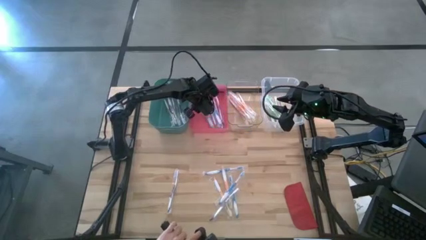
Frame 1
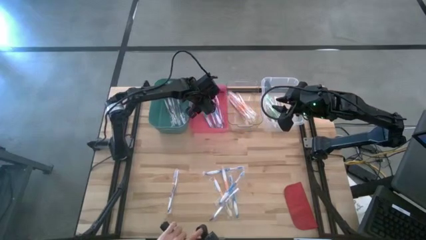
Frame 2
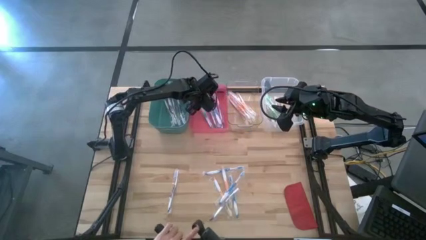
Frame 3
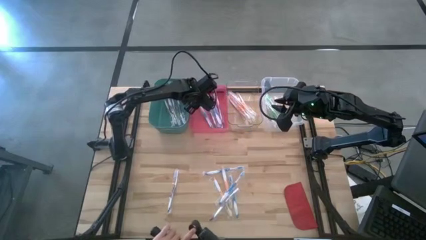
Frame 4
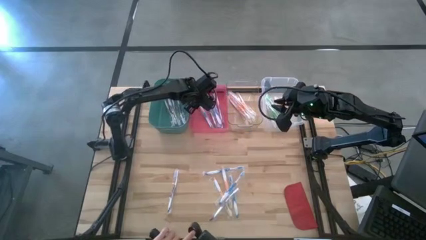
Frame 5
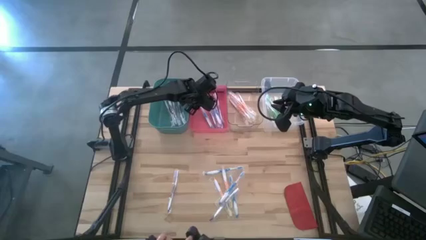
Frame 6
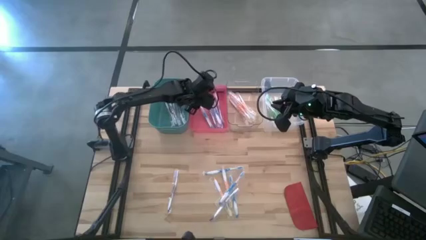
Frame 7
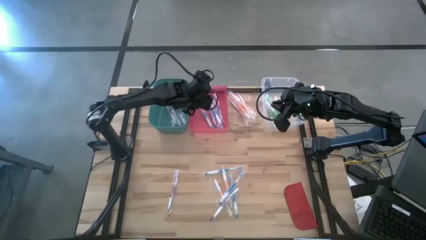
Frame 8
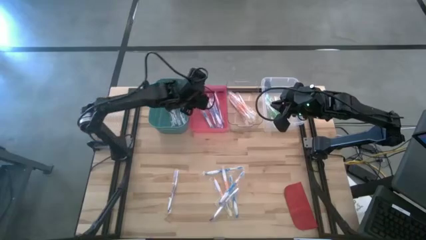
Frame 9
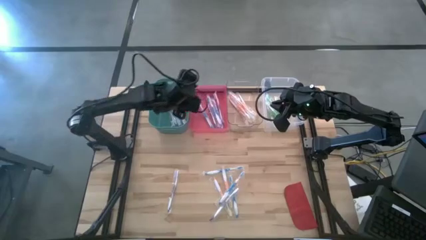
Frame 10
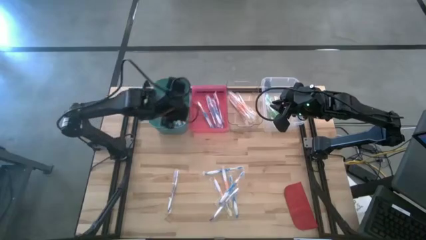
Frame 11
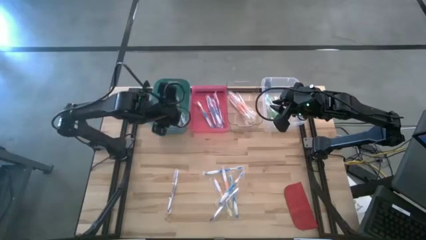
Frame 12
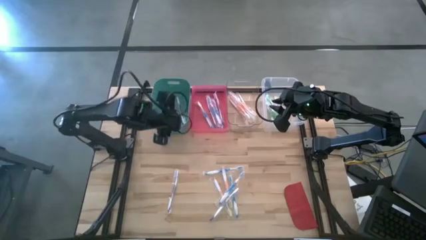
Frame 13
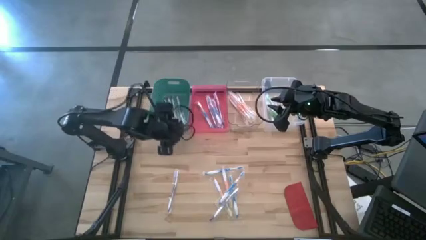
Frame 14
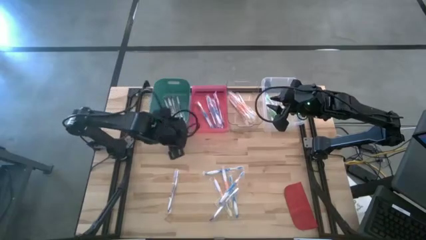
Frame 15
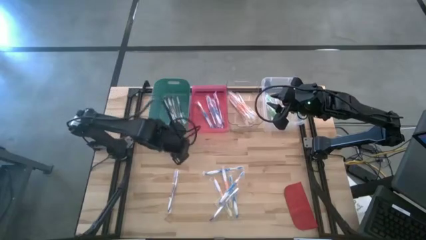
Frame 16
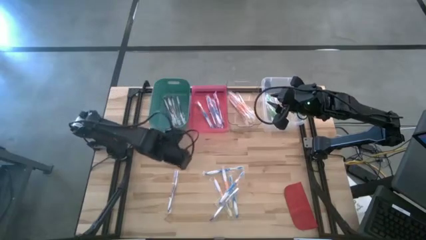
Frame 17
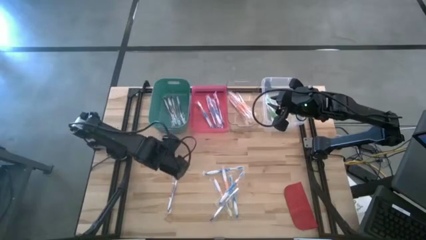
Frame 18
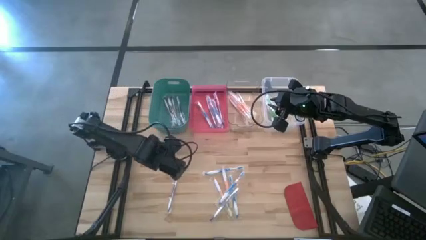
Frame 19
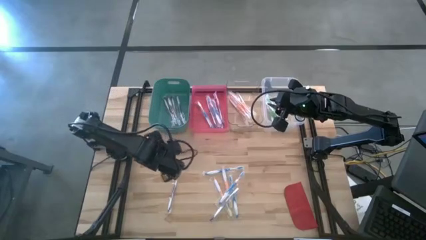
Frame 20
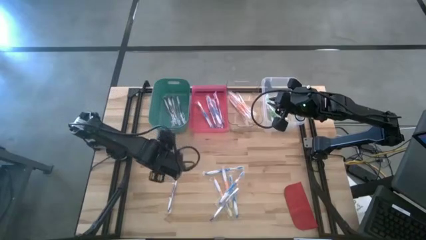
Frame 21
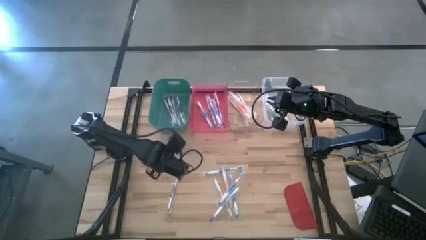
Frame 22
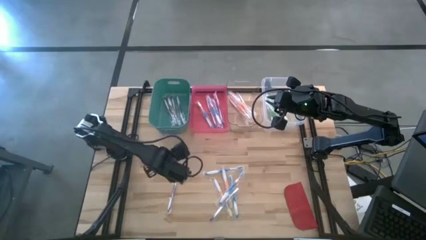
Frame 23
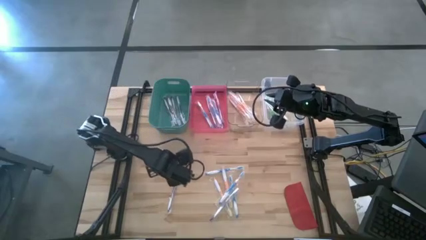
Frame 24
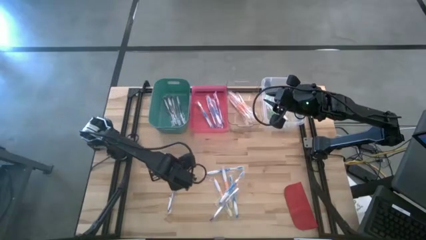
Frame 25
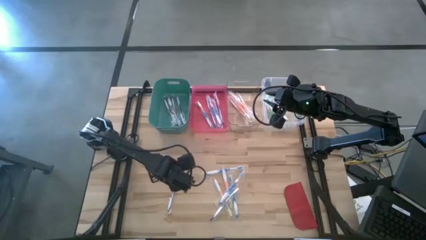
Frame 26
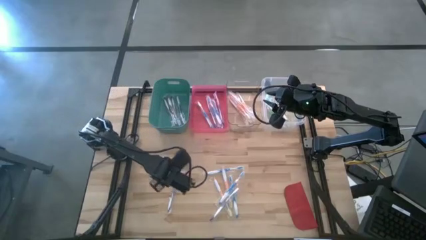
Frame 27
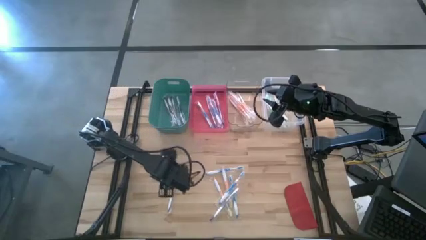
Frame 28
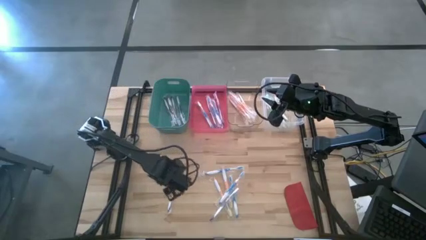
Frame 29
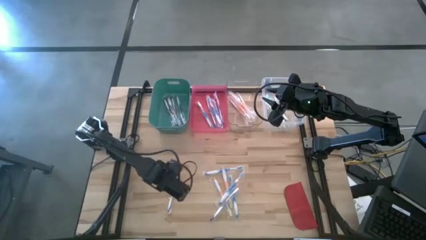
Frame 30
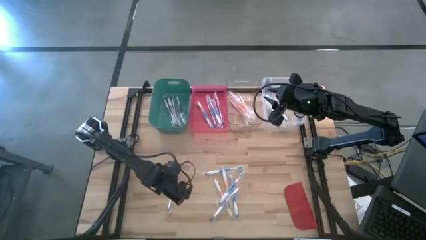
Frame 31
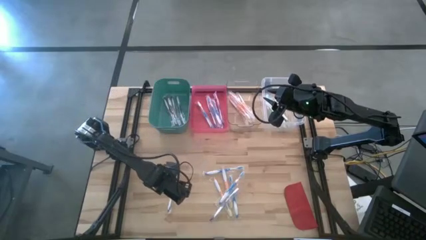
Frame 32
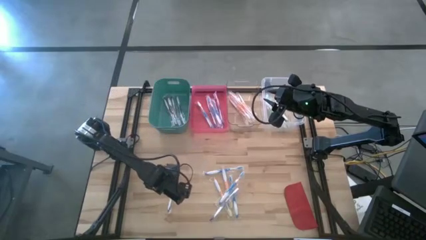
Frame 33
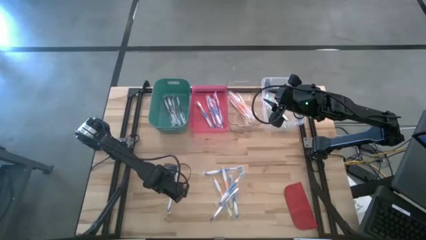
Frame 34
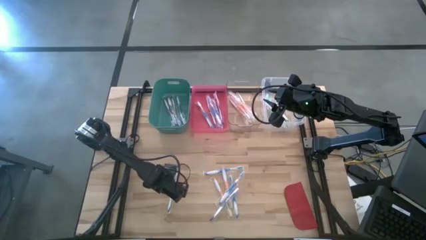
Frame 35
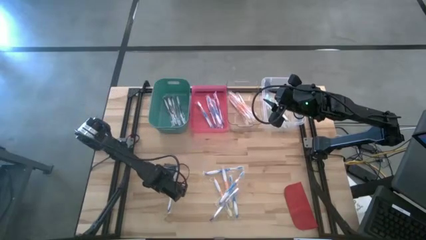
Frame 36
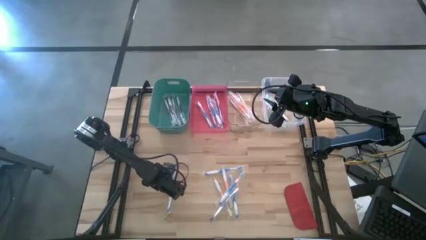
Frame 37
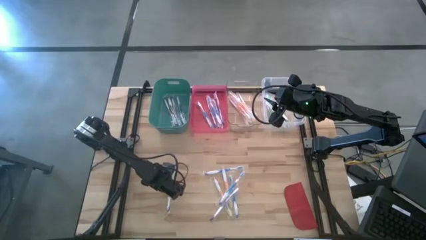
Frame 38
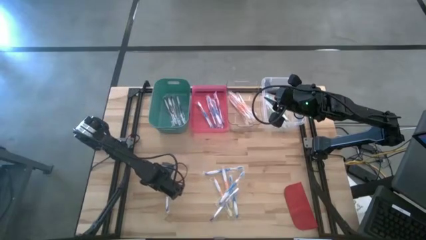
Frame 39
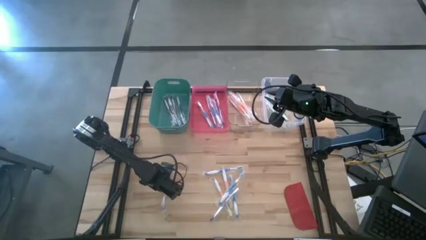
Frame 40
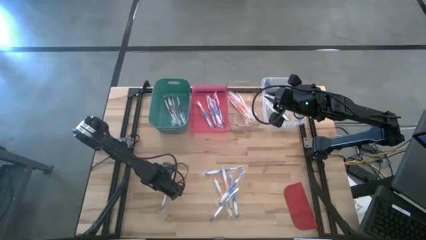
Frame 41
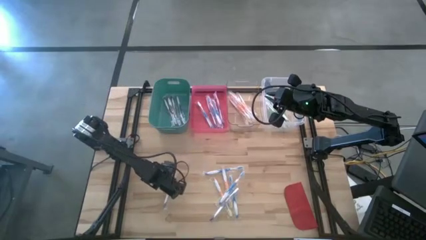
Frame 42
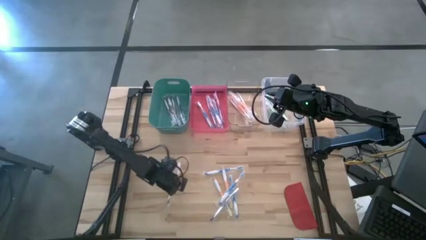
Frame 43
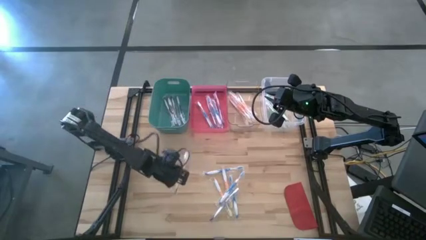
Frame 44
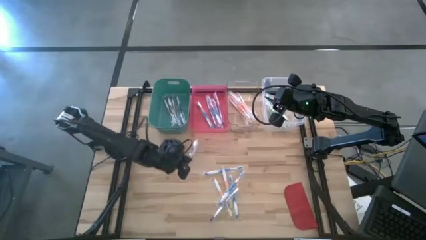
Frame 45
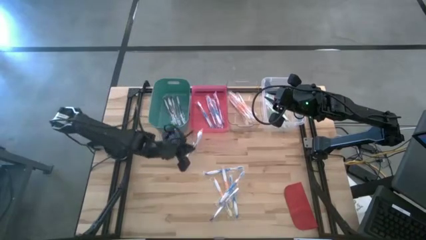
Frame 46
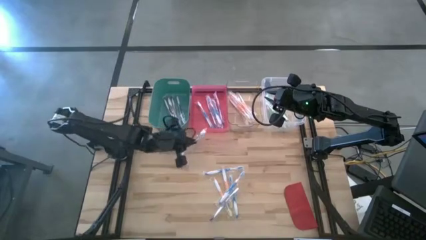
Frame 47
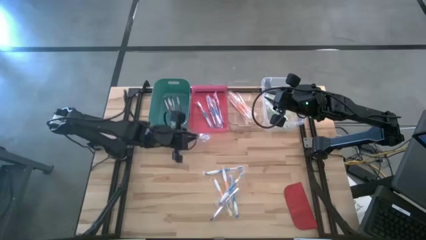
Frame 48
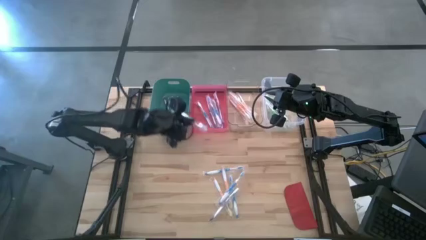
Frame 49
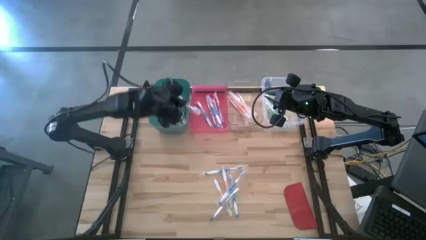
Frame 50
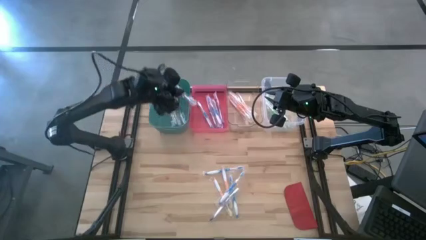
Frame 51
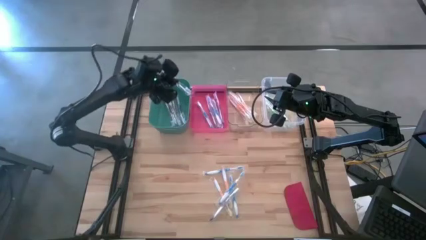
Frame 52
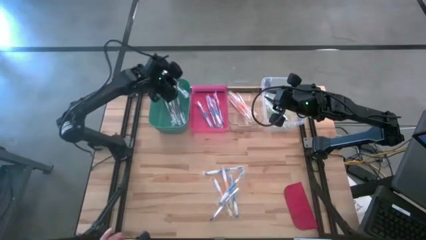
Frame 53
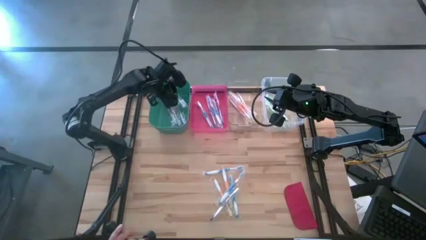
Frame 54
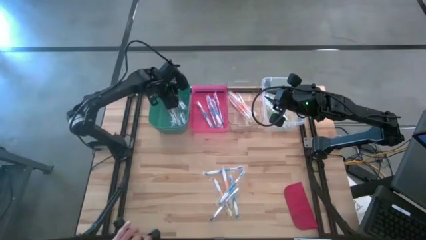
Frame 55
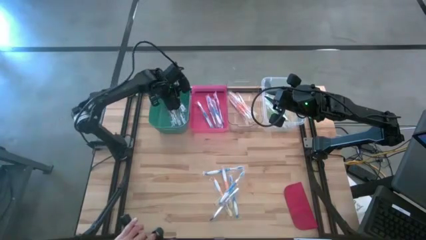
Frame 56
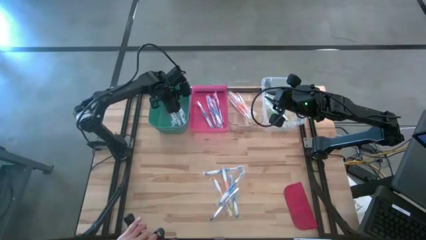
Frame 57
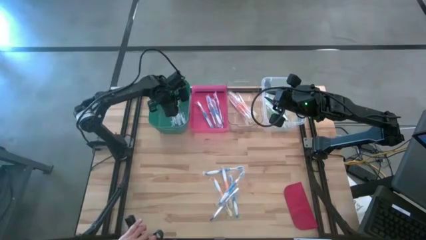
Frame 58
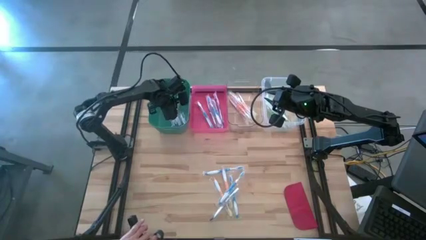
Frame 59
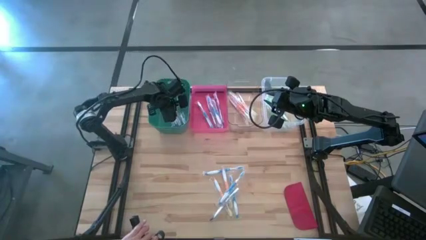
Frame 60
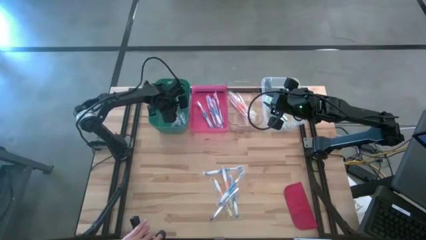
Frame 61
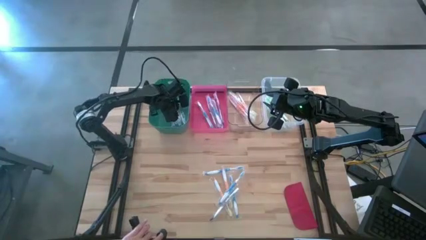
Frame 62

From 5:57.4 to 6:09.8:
Task: Pick & Place Toothbrushes
Put the violet toothbrush into the green bin

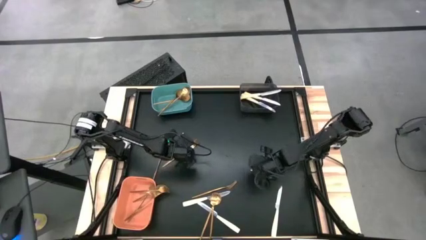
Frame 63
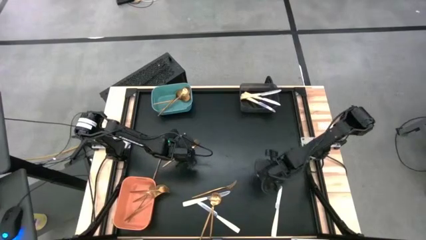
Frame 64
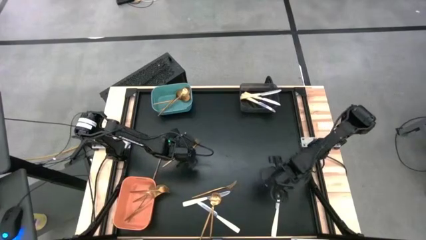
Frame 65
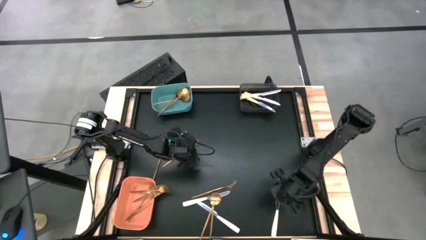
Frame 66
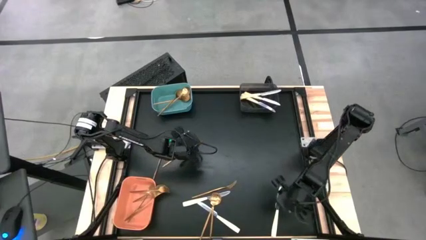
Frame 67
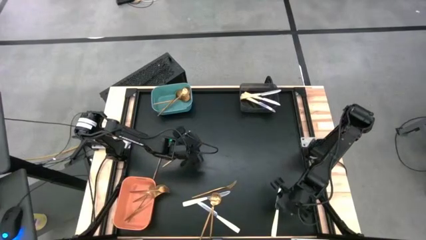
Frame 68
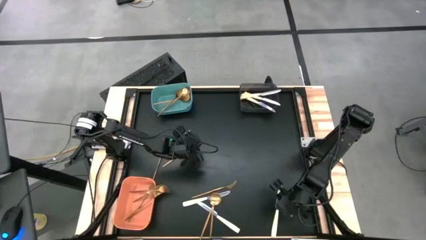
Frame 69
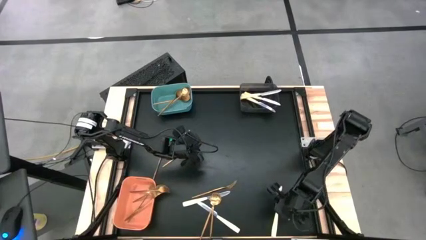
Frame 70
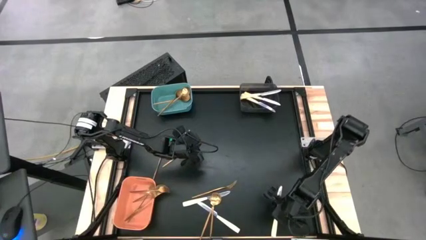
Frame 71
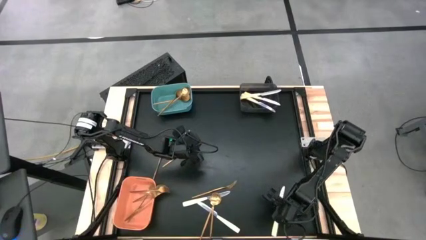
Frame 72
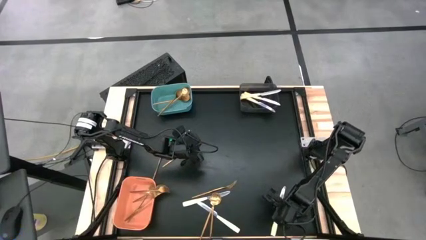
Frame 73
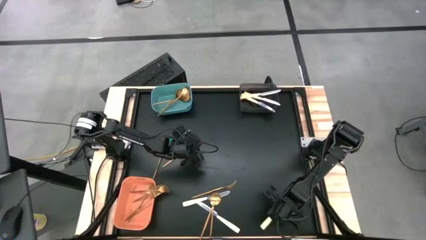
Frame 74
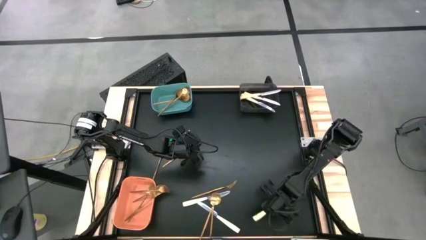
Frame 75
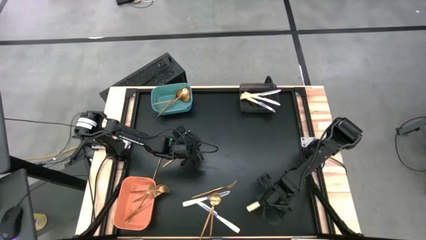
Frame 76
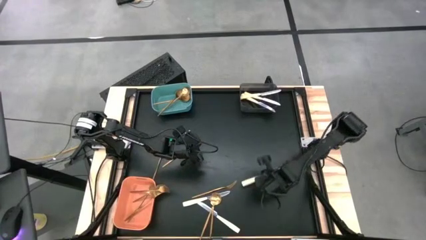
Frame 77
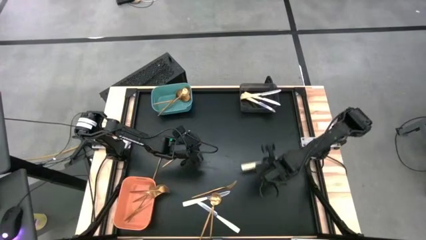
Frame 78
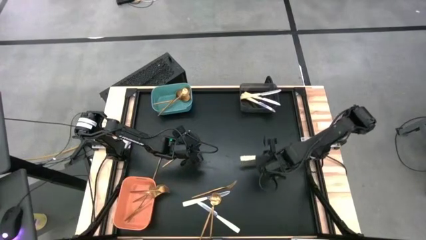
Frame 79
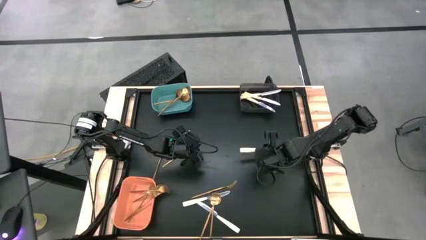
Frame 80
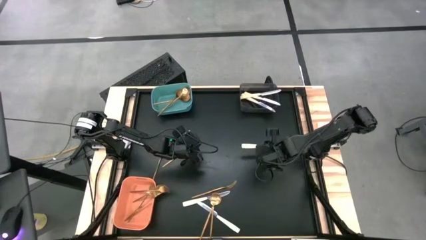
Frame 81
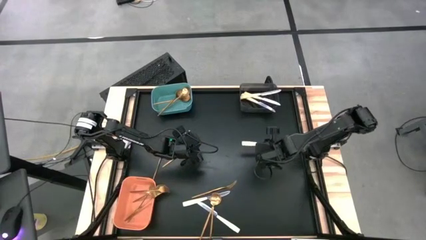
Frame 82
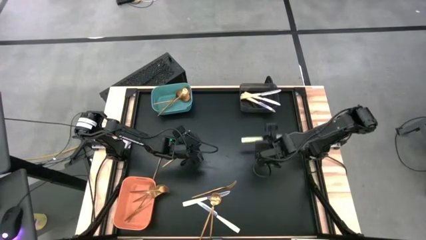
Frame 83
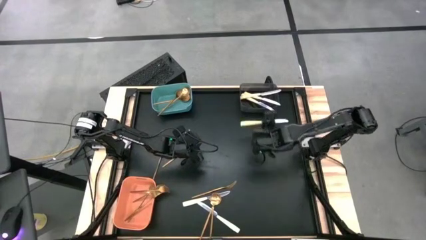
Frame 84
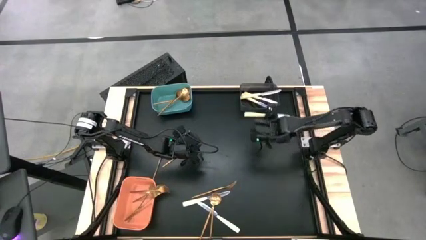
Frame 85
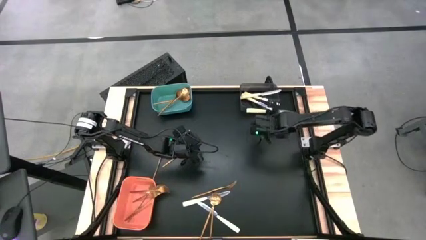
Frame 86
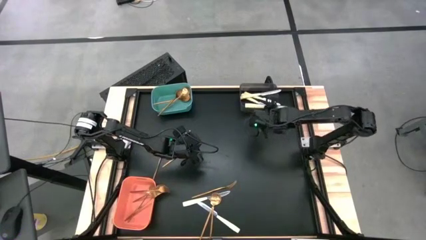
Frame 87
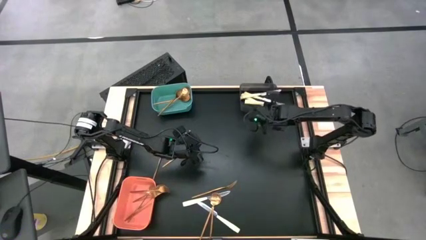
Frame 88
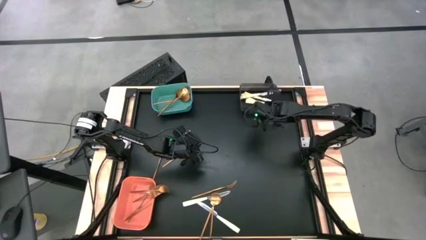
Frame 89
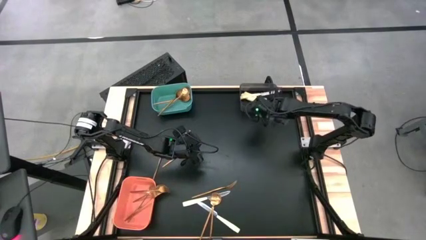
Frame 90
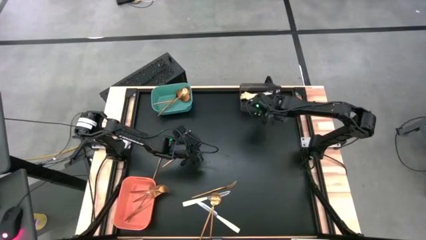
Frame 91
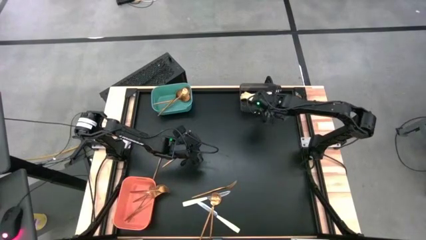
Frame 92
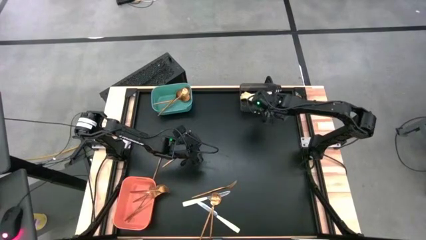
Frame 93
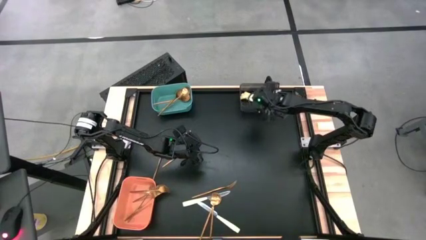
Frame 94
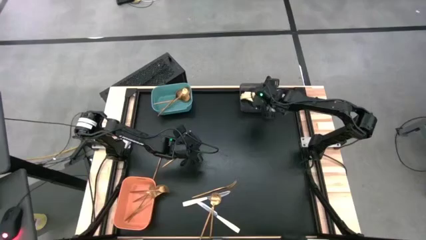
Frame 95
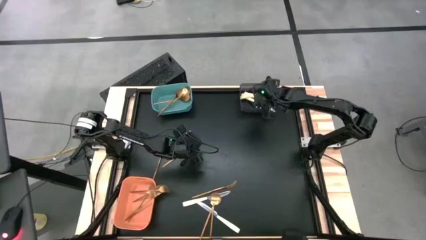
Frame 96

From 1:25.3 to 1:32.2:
Task: Sort silverware by color (type)
Put the yellow knife into the black bin
